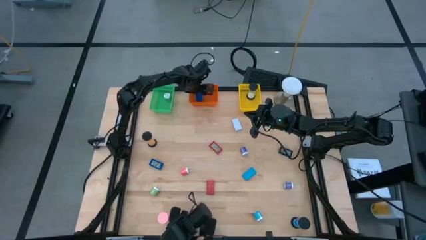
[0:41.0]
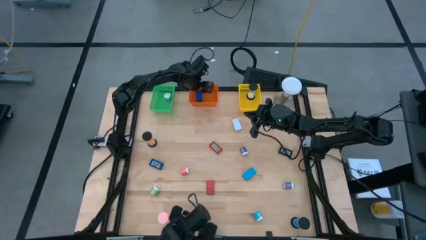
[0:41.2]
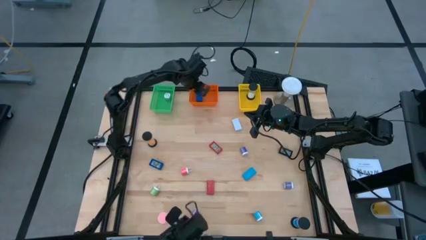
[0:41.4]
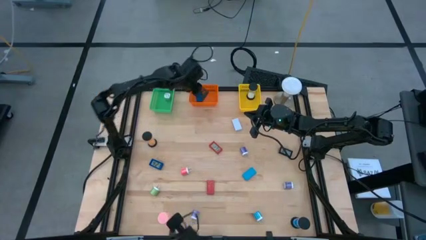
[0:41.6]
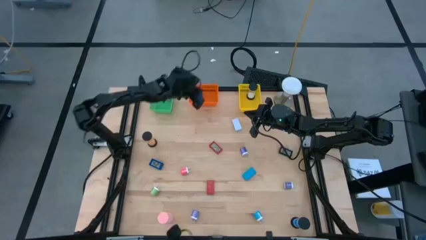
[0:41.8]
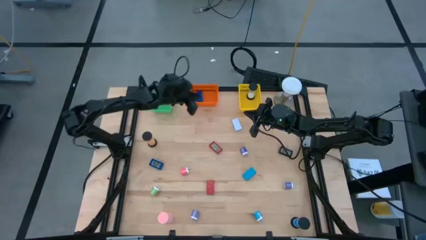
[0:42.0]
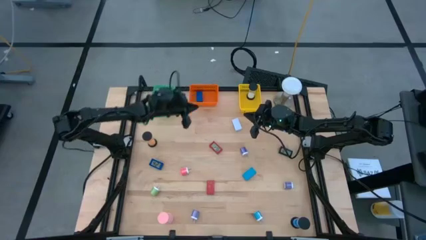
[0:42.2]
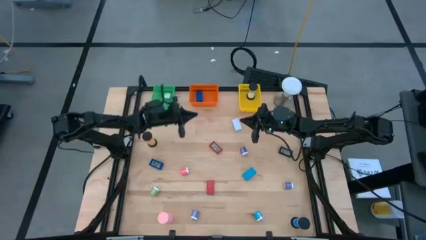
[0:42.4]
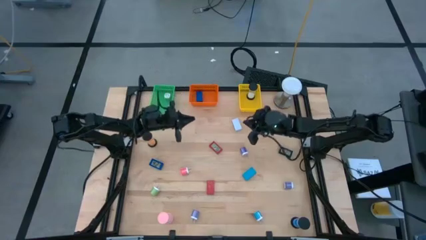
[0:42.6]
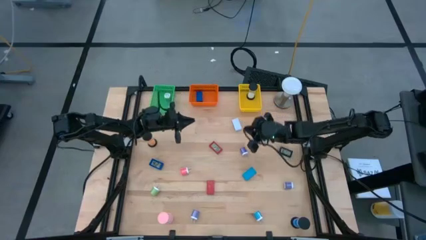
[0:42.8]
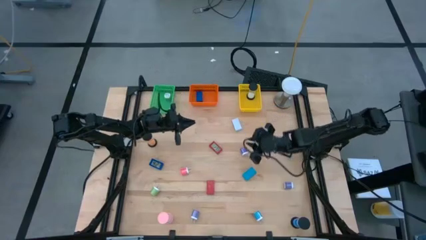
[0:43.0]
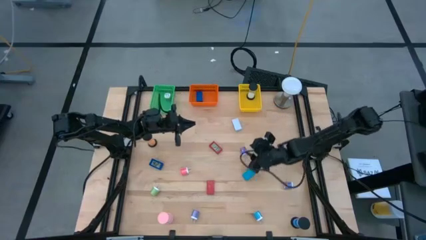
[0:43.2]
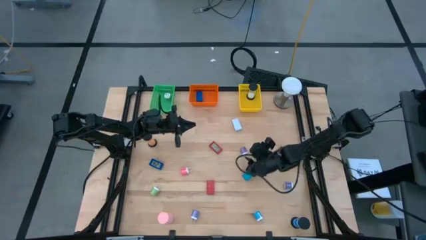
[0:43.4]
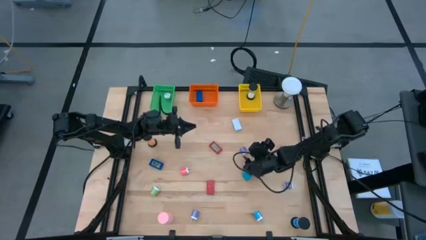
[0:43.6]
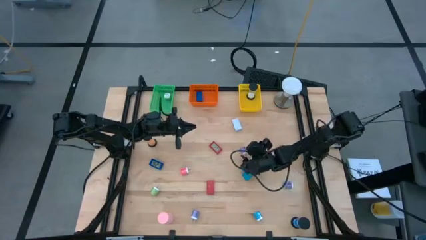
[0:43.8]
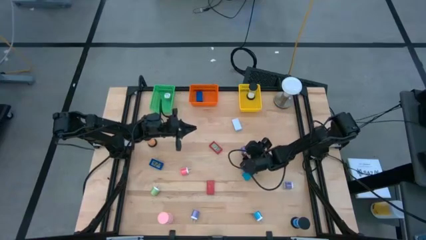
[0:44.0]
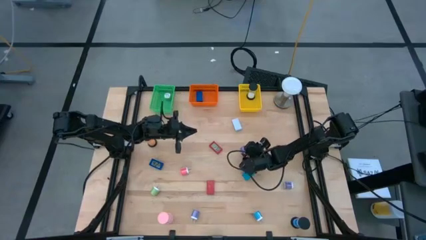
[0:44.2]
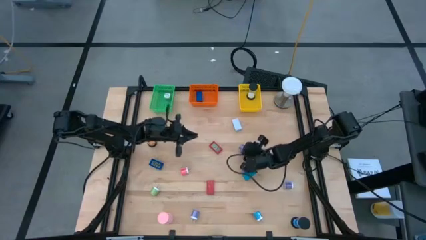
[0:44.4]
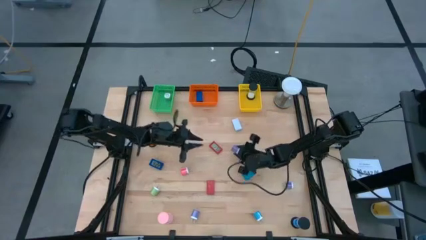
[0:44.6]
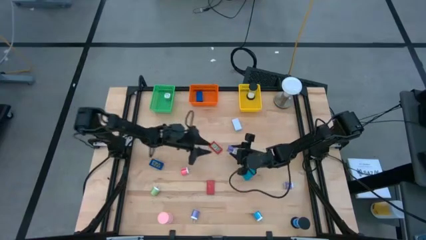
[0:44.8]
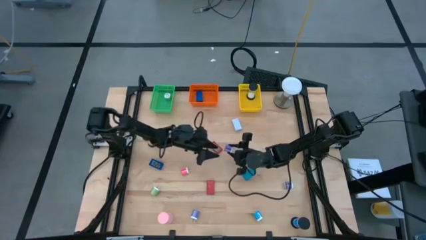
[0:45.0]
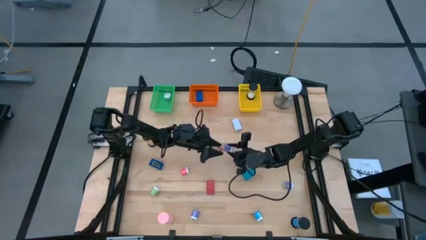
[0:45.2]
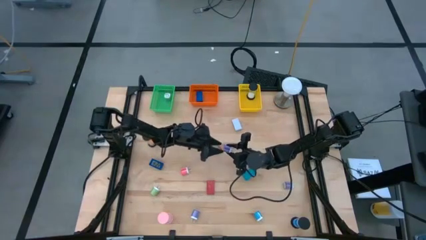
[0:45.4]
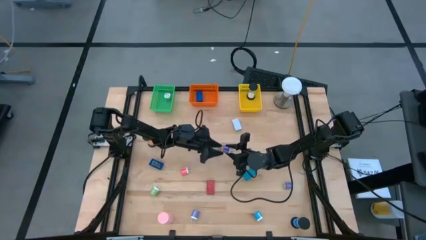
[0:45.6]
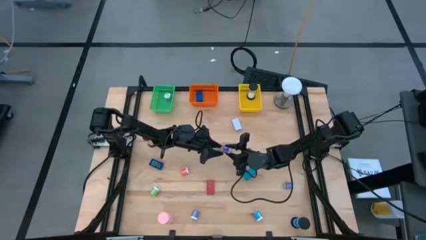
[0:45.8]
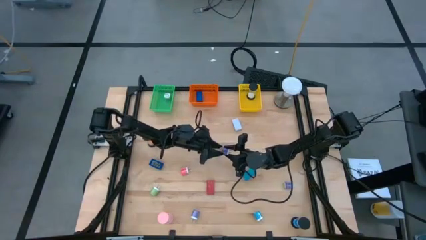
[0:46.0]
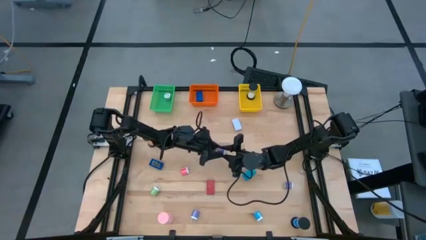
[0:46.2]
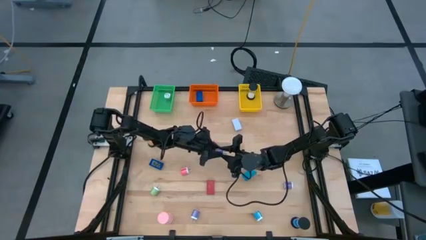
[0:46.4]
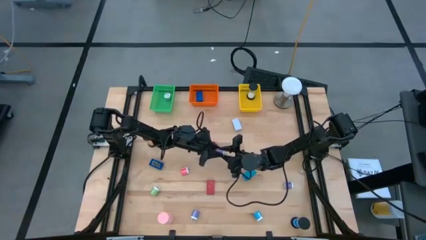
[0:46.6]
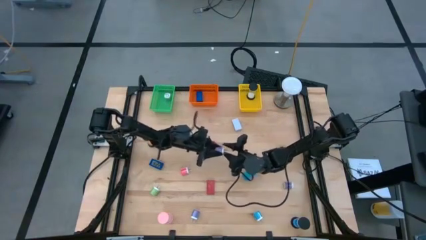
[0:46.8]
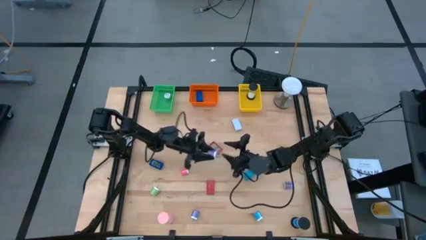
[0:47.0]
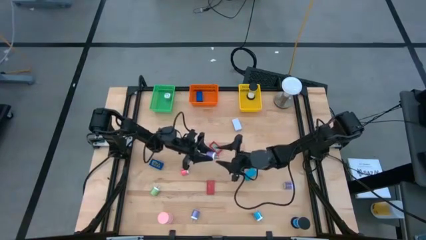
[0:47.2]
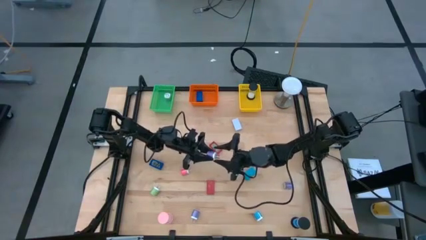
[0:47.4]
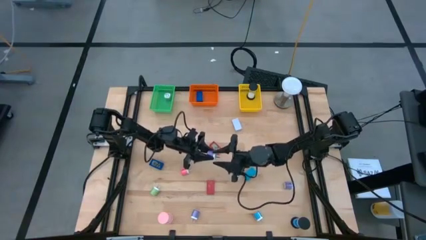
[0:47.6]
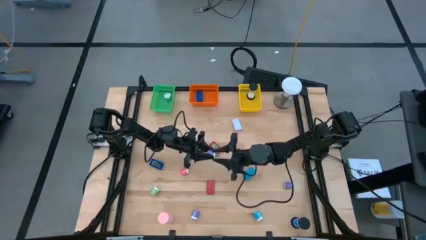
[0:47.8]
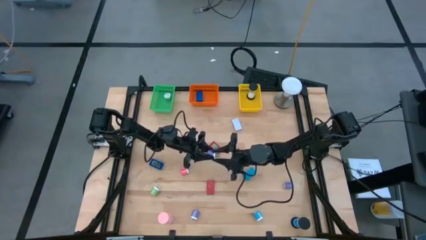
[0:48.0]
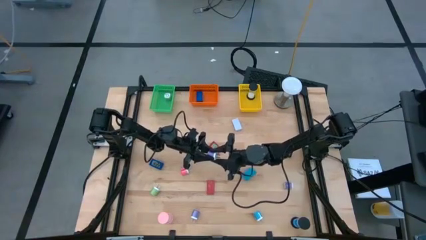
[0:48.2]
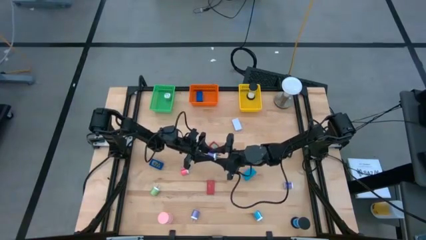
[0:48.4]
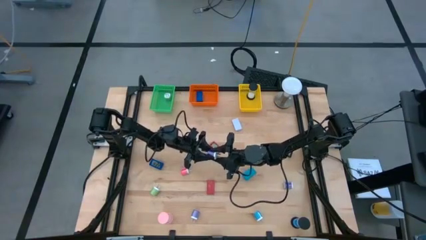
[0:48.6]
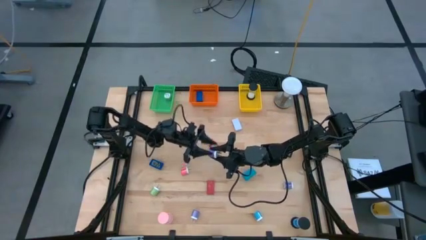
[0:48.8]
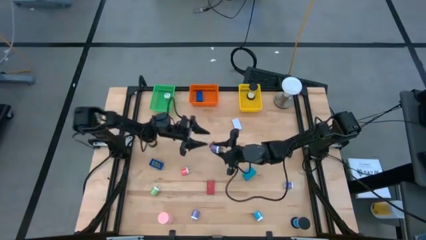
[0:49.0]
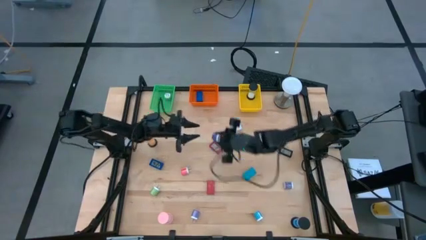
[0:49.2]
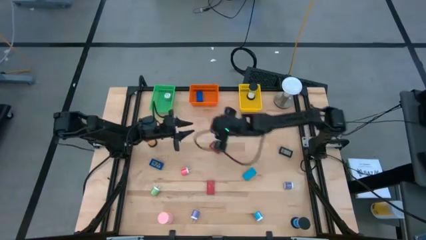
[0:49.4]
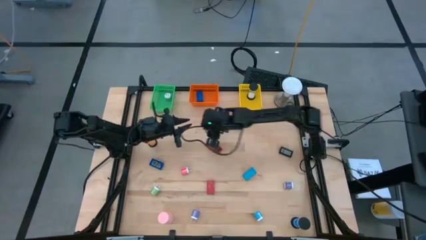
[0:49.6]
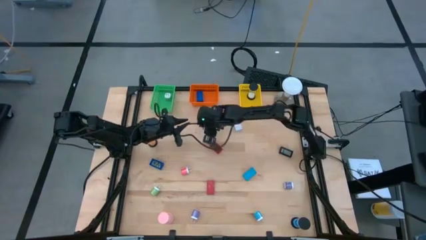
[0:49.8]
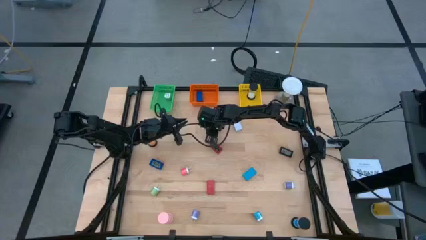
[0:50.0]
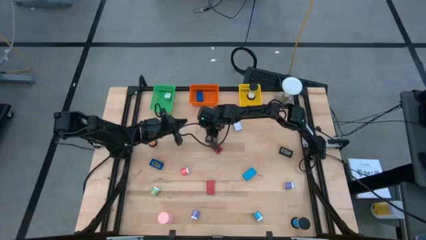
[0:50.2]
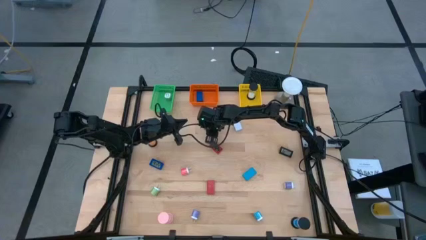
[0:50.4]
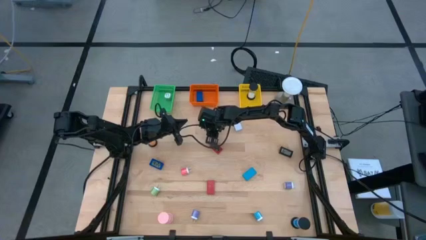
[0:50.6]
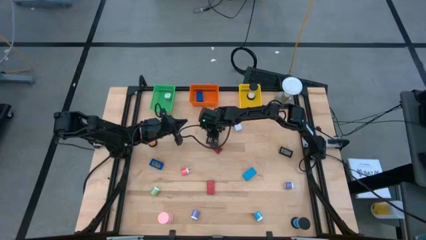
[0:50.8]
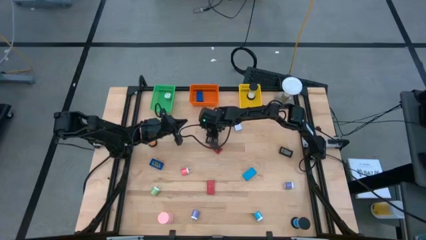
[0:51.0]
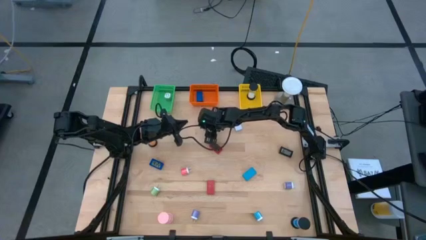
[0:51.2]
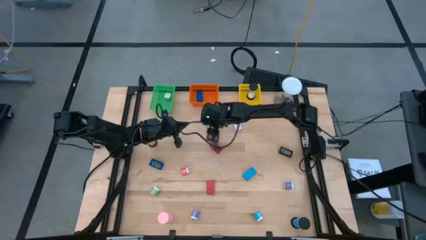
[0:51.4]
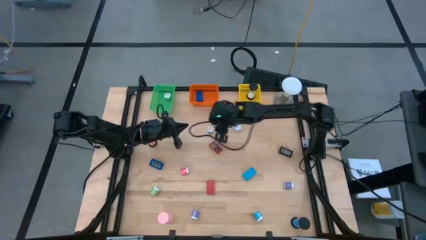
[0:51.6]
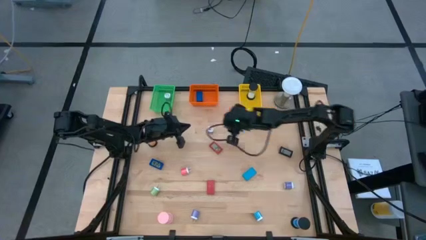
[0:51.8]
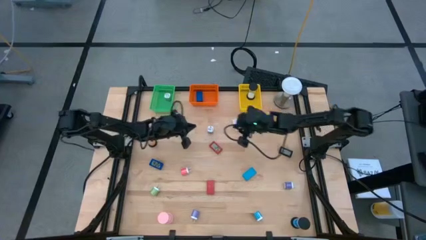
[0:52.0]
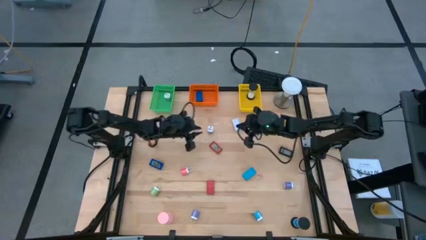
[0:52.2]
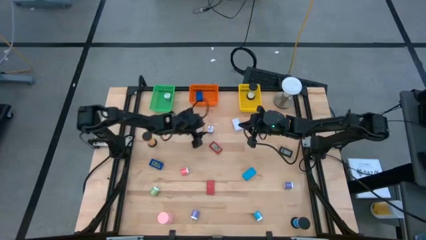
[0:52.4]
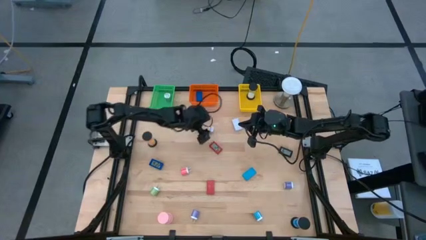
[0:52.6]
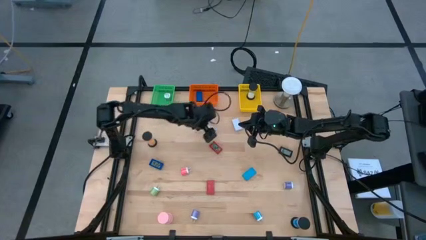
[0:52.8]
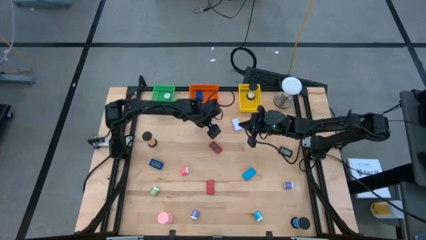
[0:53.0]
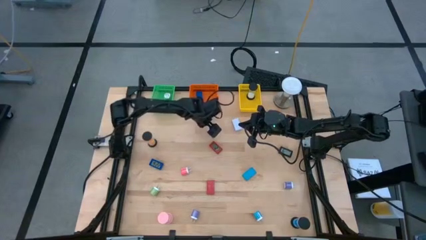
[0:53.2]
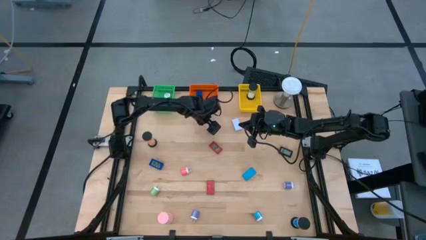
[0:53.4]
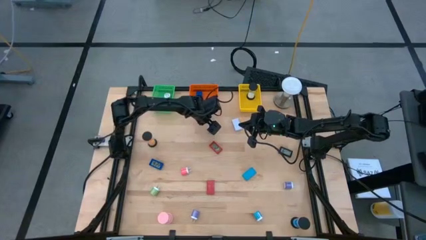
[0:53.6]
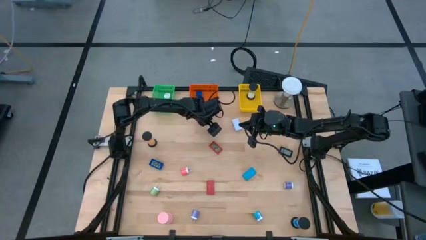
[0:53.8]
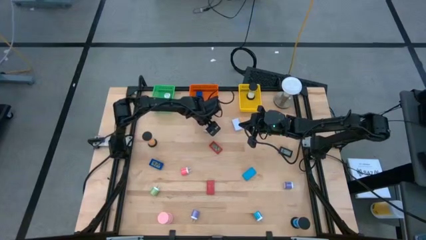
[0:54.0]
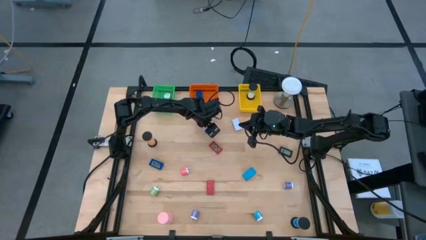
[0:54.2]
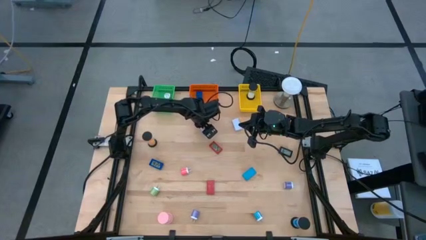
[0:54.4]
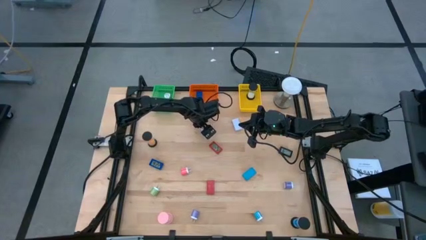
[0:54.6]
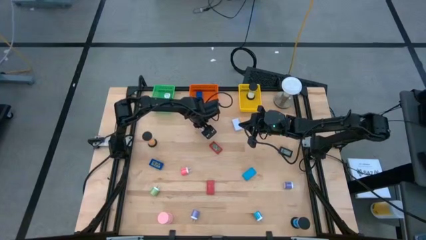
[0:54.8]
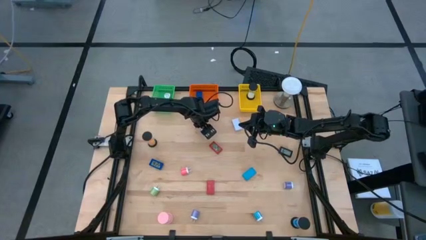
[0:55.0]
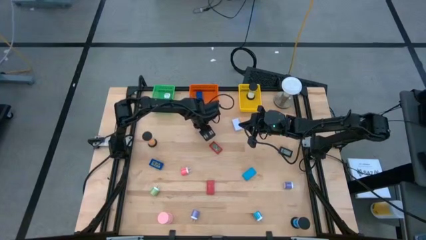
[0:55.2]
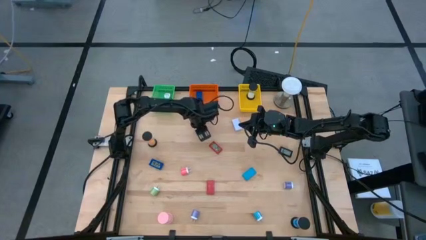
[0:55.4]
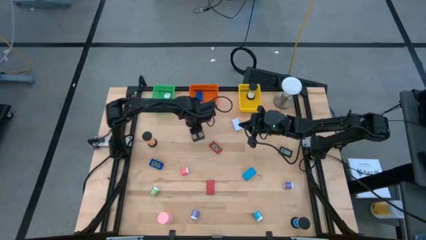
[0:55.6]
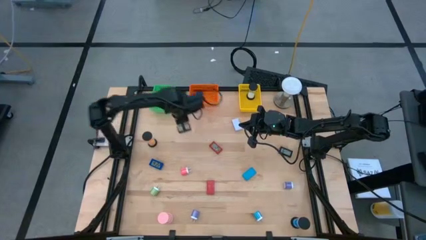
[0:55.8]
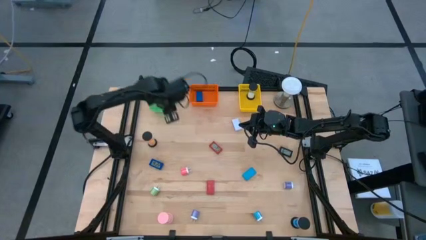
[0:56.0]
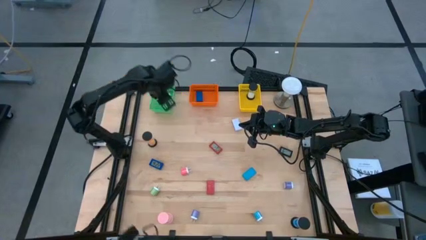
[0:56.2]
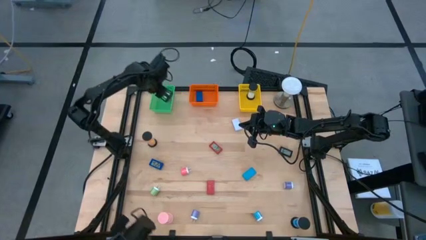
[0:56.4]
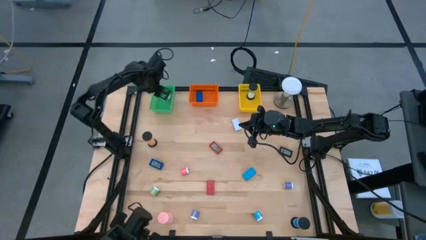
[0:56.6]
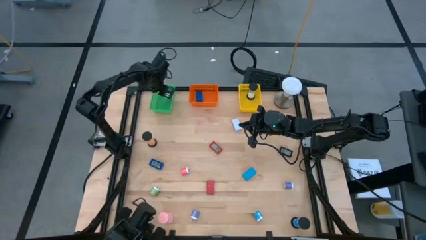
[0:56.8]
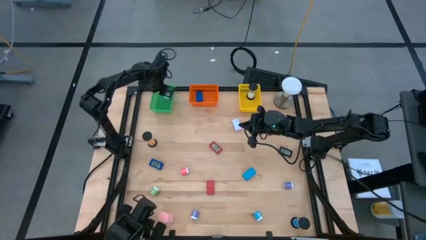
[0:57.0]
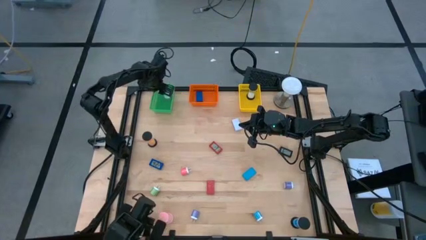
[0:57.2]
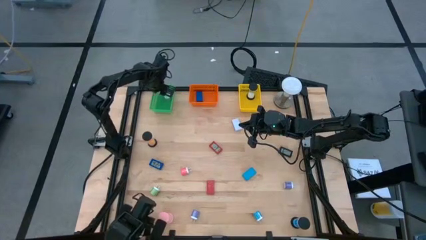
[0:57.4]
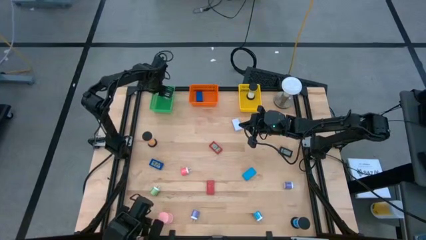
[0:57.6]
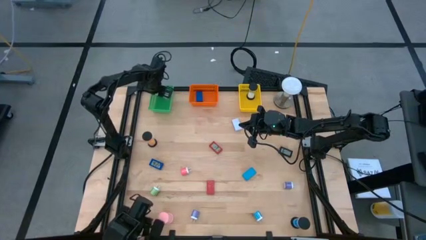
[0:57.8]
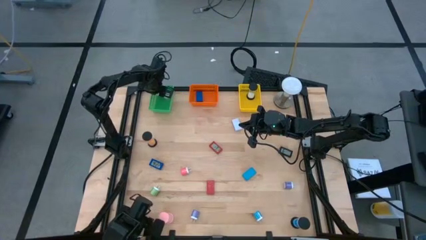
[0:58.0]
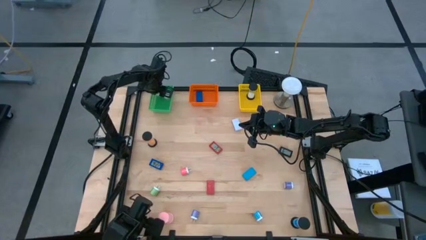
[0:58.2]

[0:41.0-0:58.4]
Task: Pick & Place Office items
Put the top purple charger adaptor into the green bin
